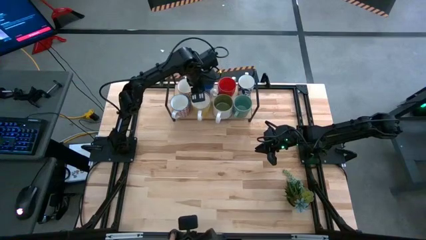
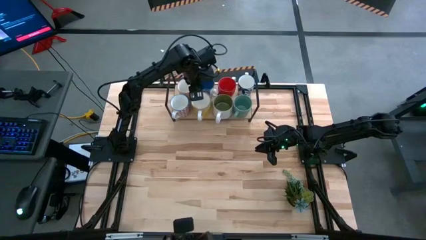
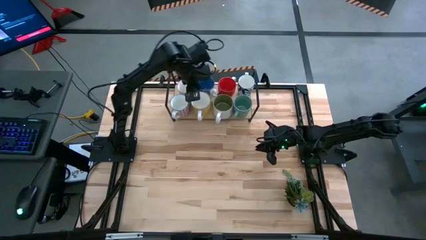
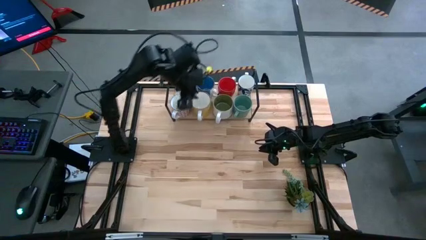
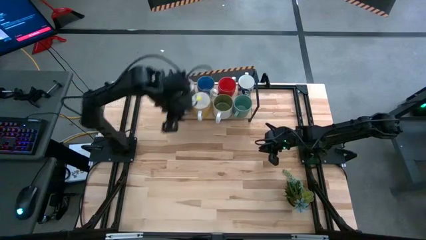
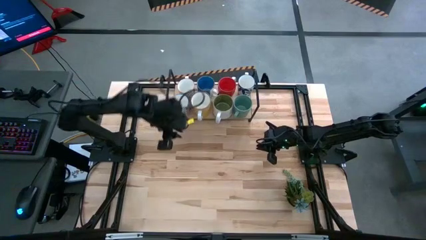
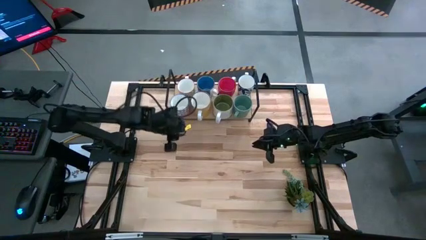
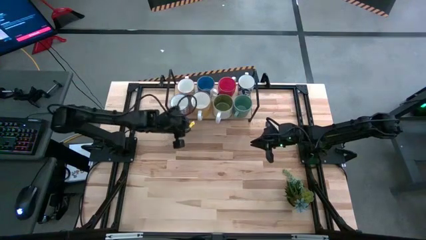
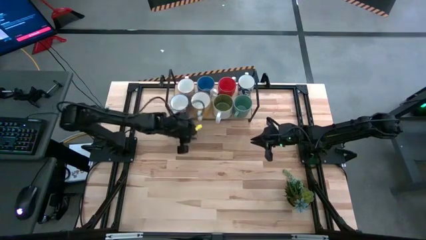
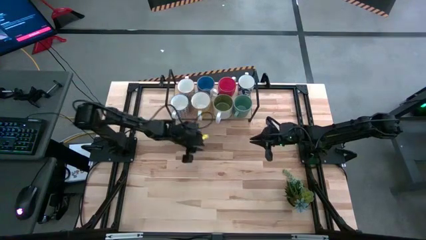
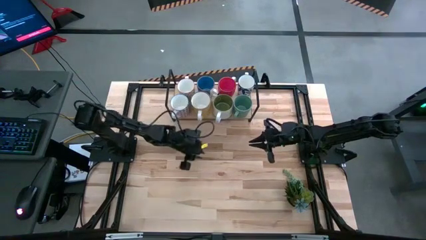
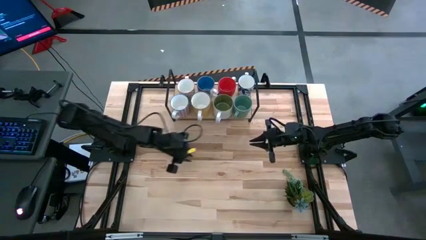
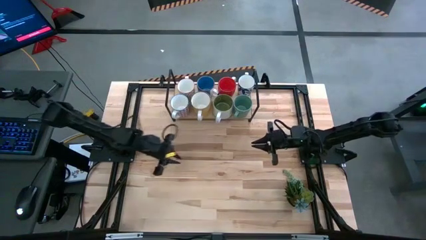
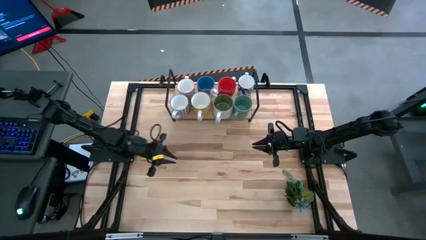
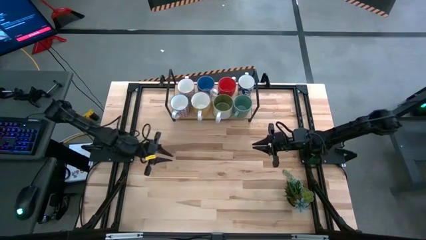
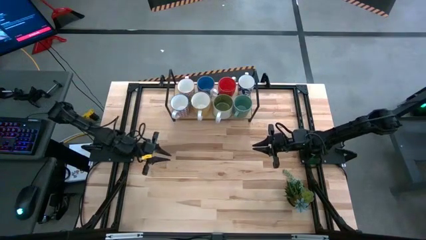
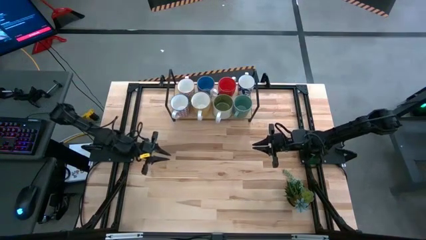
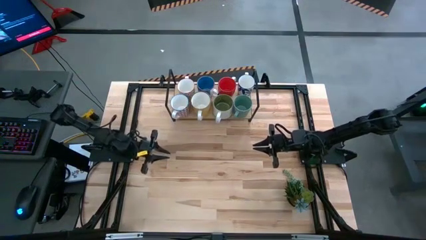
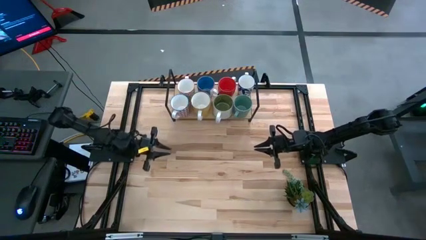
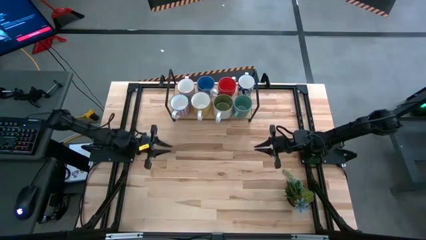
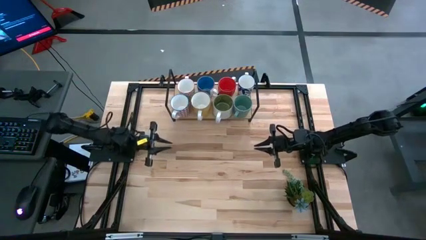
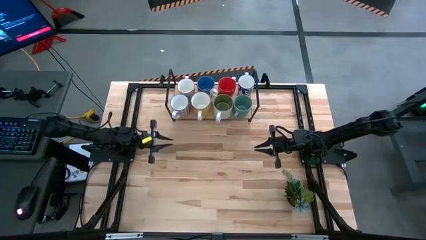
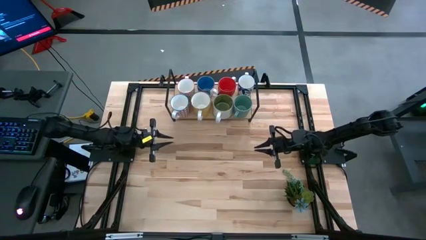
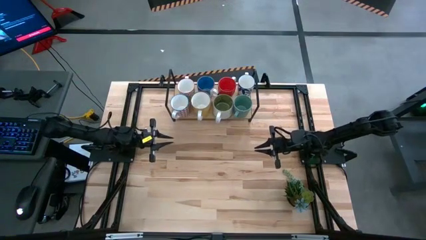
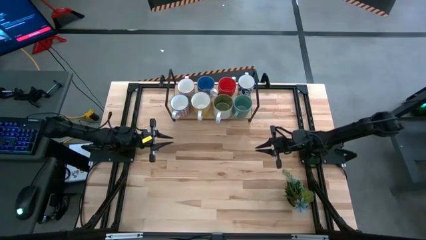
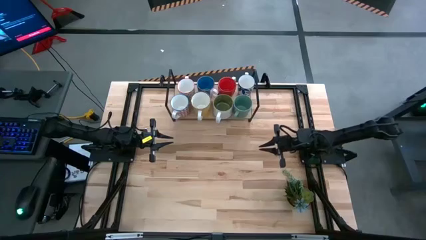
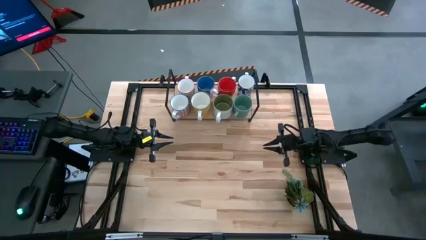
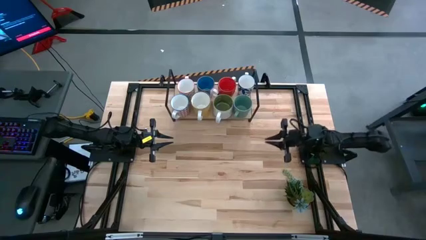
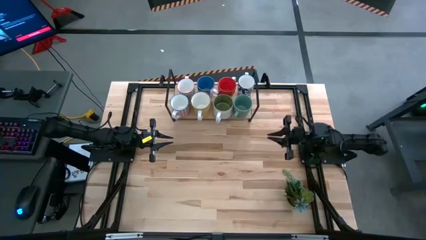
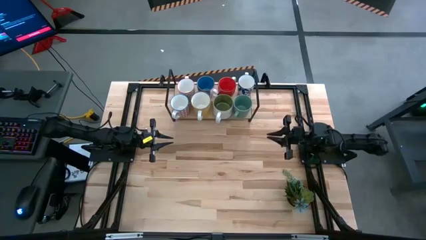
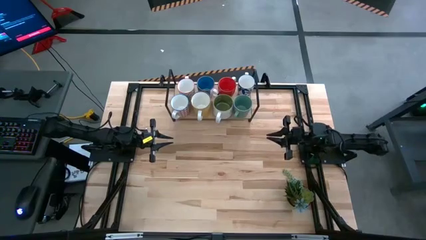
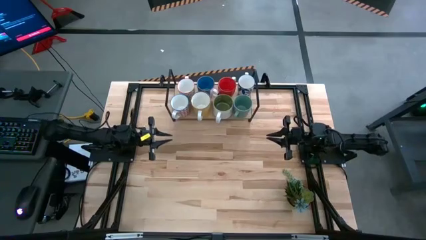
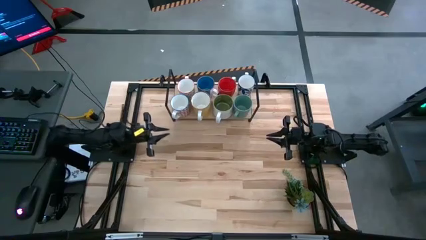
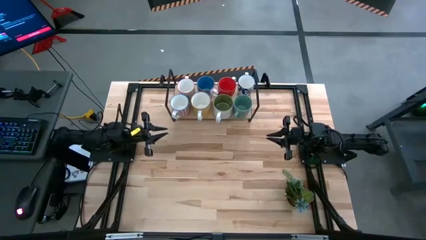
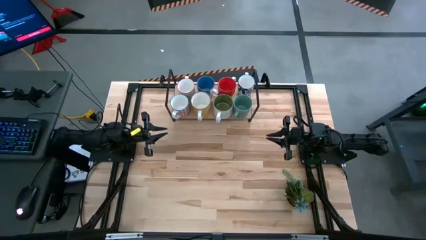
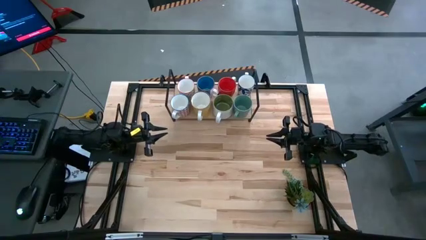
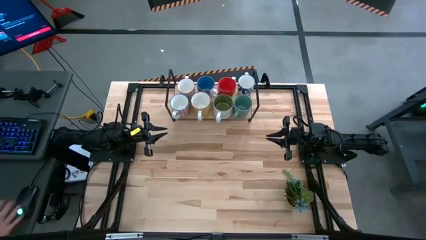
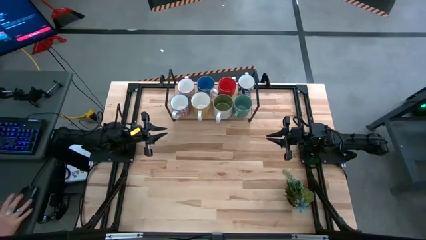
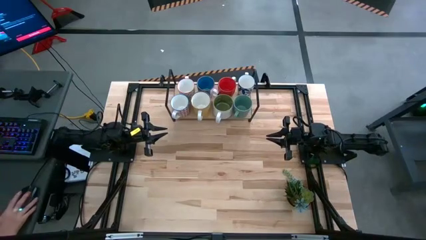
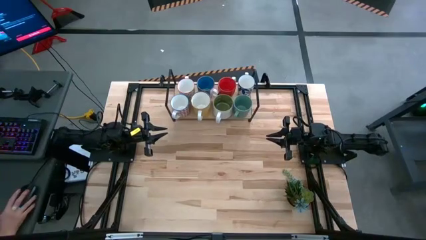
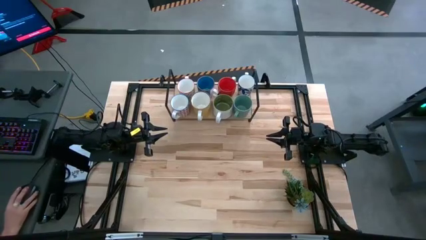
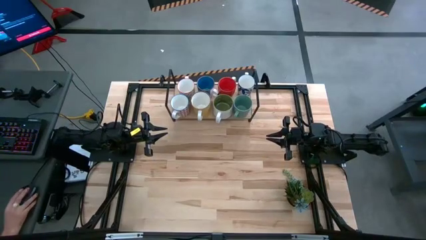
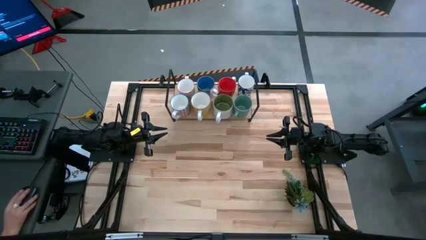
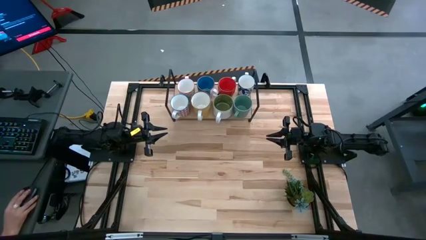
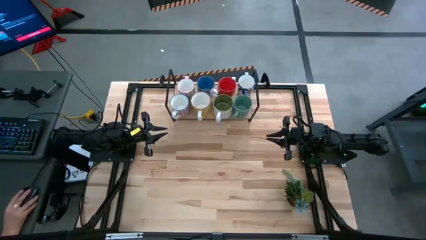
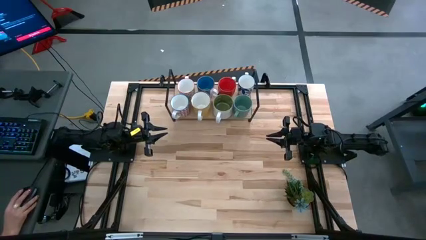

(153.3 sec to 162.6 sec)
Task: Place coffee mugs
Return to Home Position

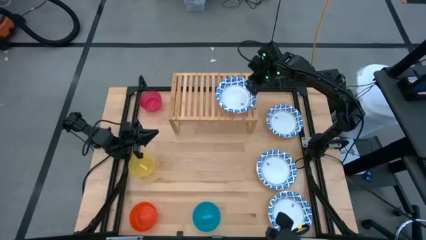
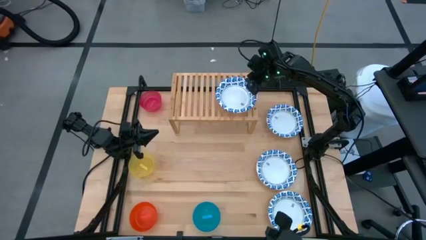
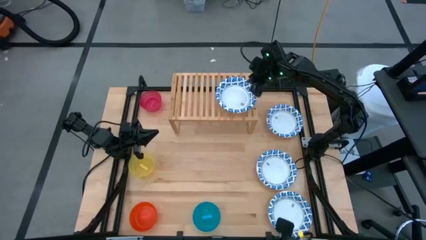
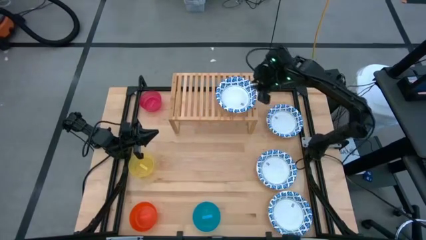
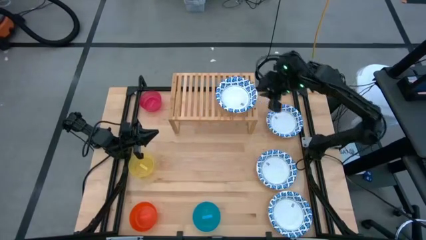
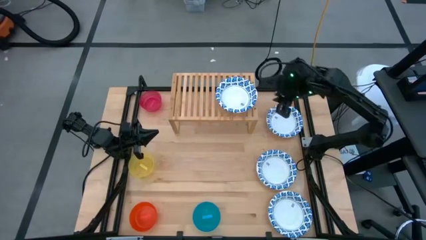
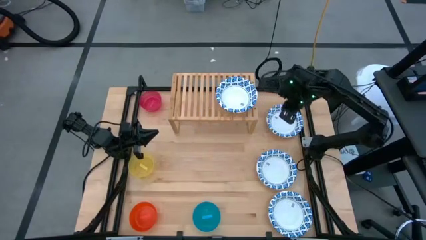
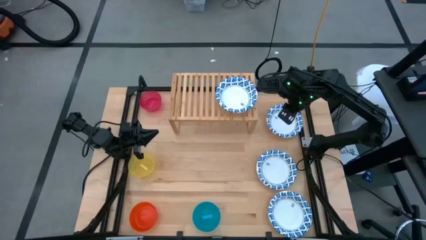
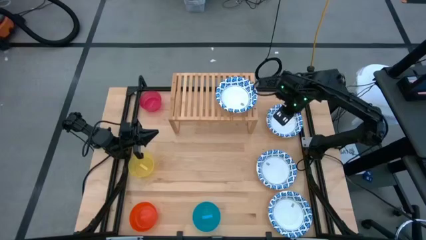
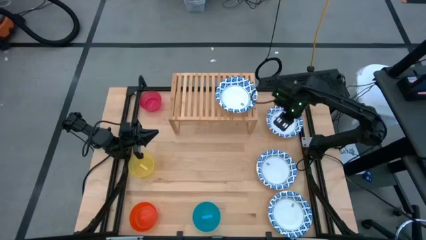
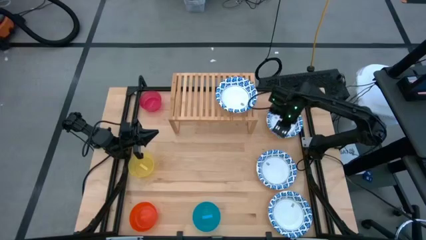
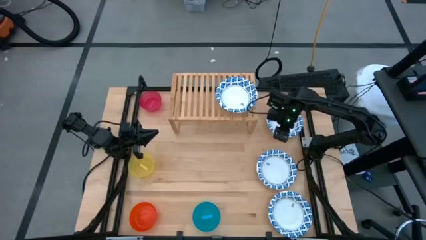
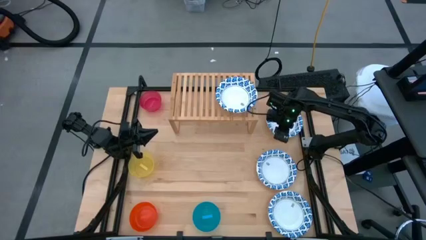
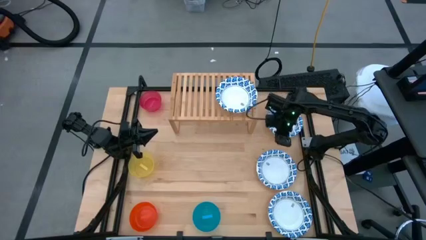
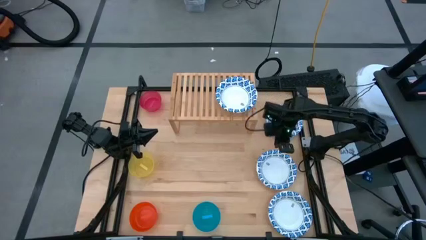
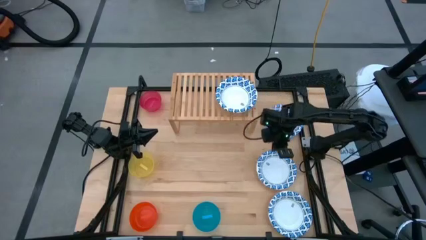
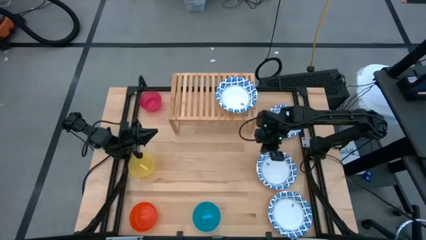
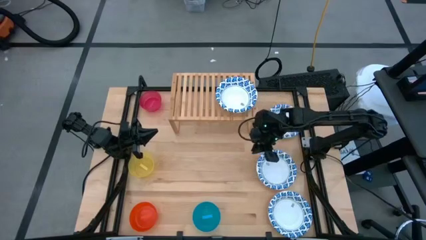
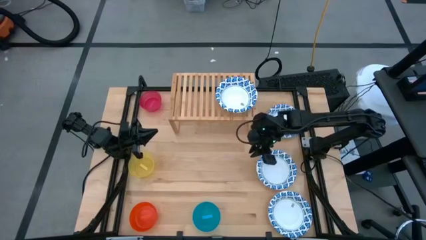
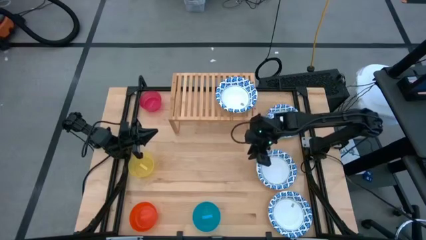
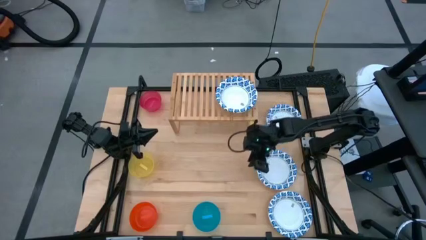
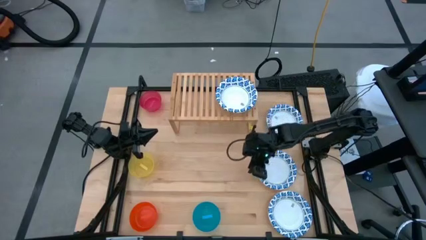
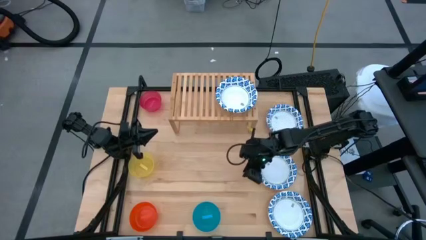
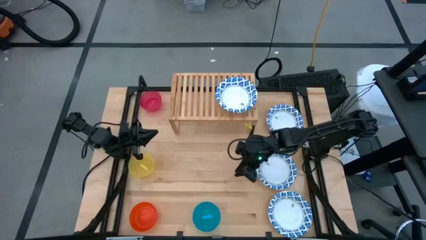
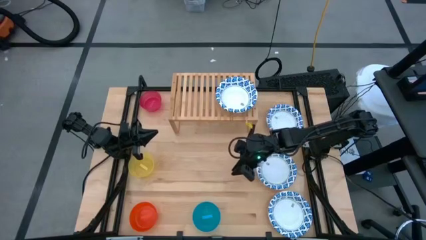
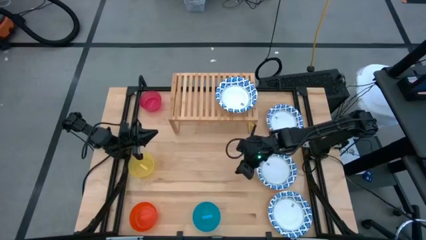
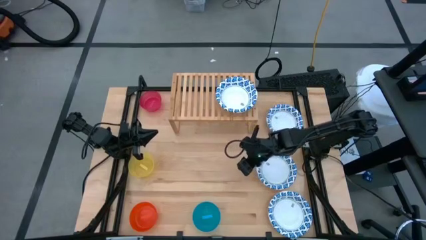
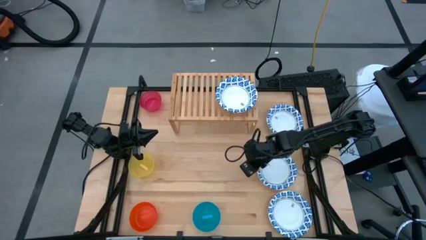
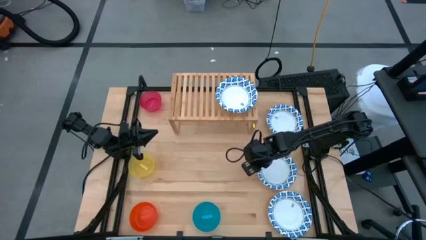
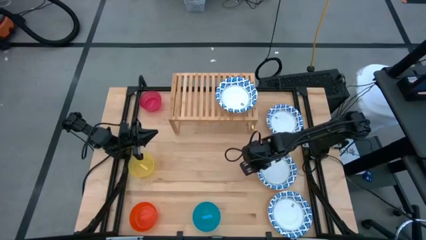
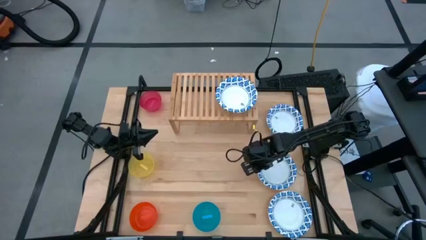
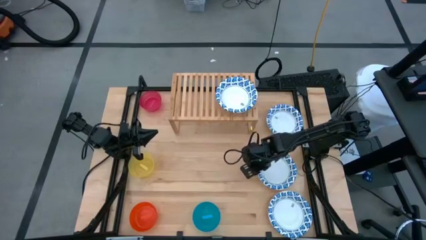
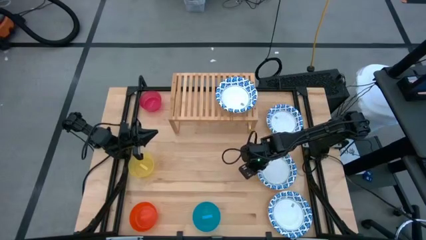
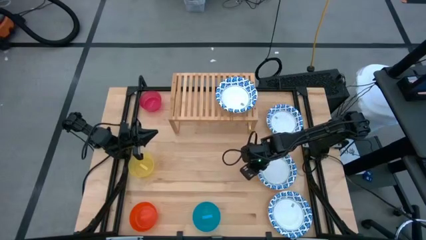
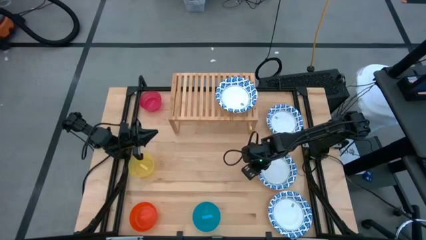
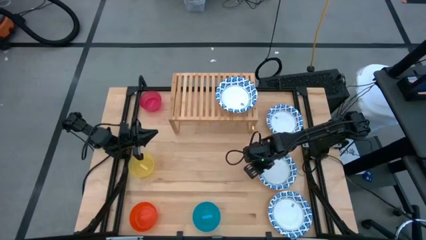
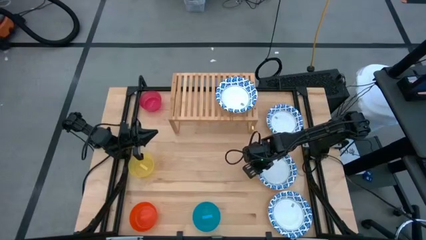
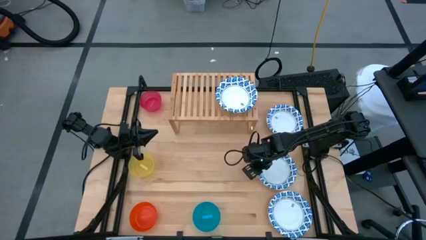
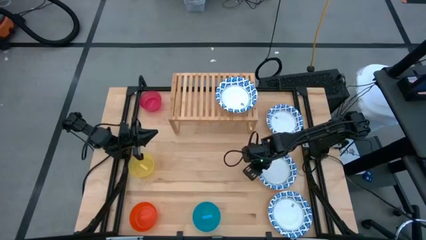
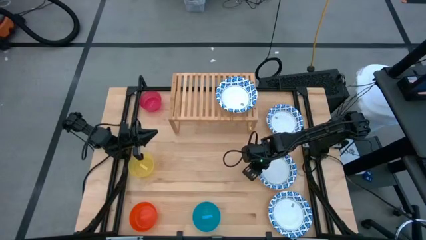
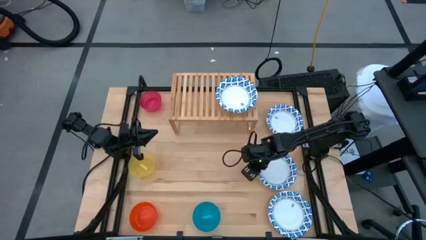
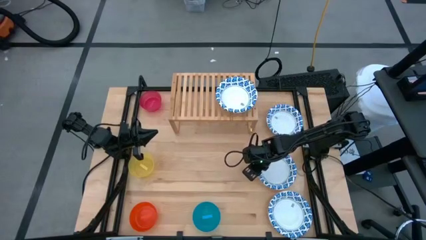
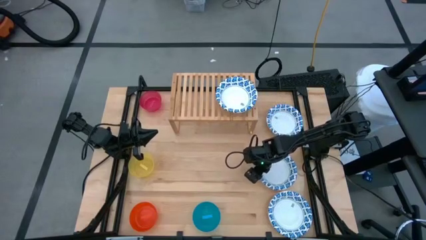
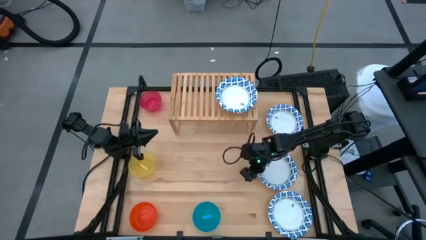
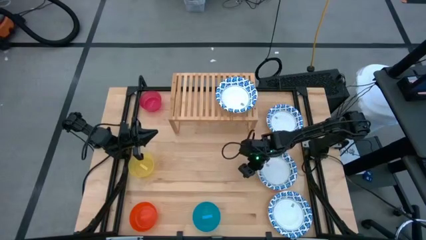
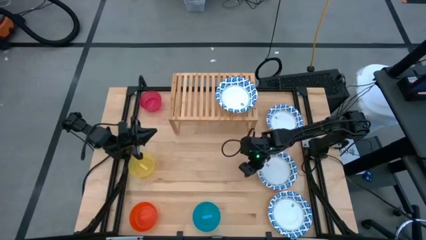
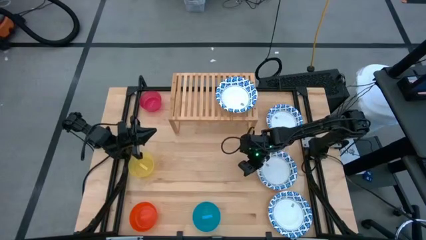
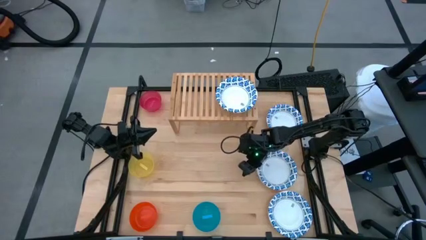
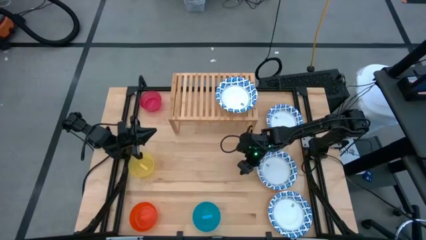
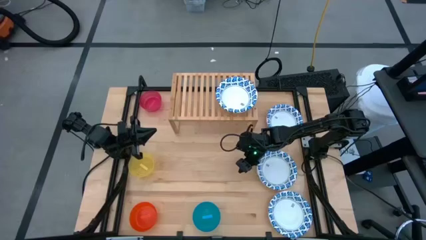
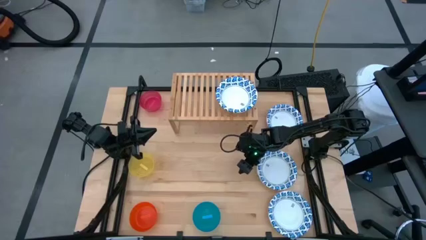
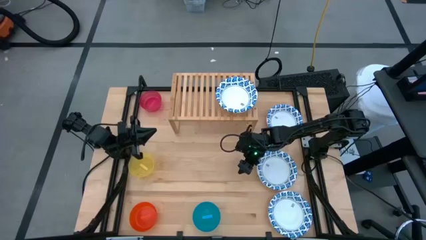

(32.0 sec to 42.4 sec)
Task: Place and stack bowls onto a shelf
Stack the white bowl on top of the white bowl on the shelf
